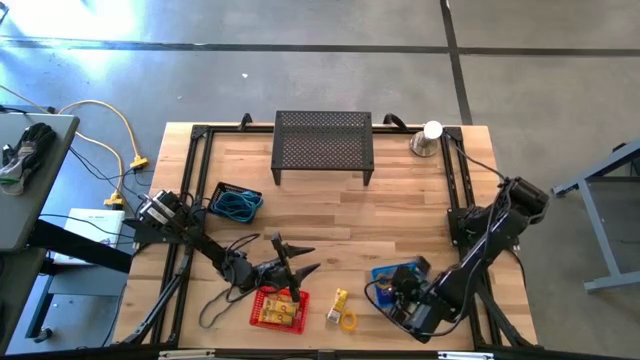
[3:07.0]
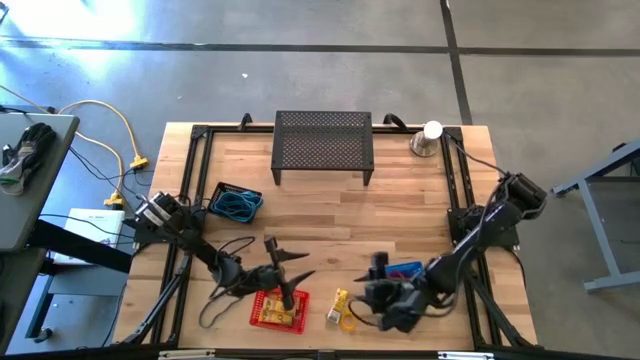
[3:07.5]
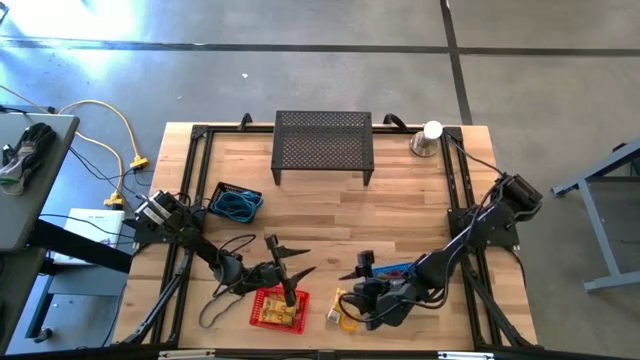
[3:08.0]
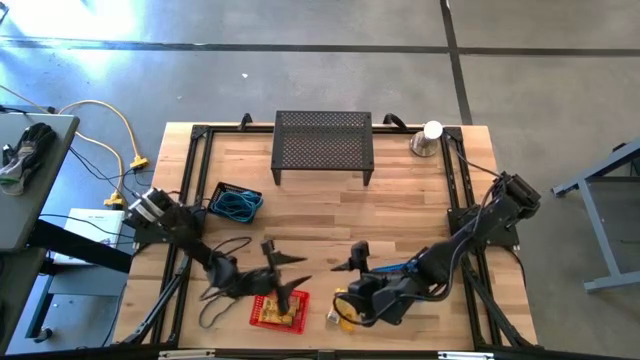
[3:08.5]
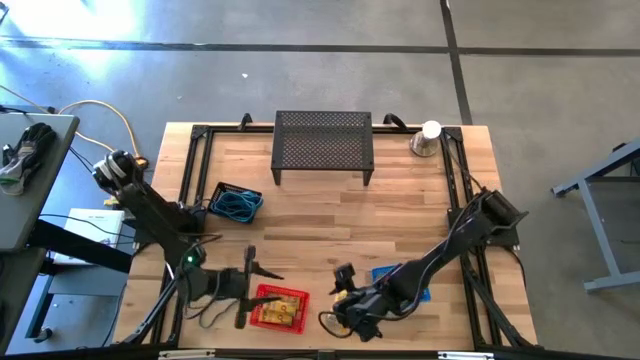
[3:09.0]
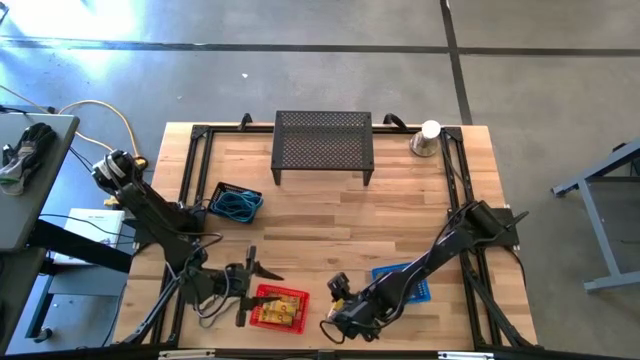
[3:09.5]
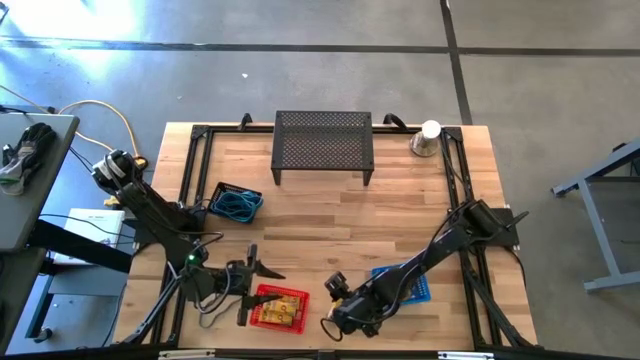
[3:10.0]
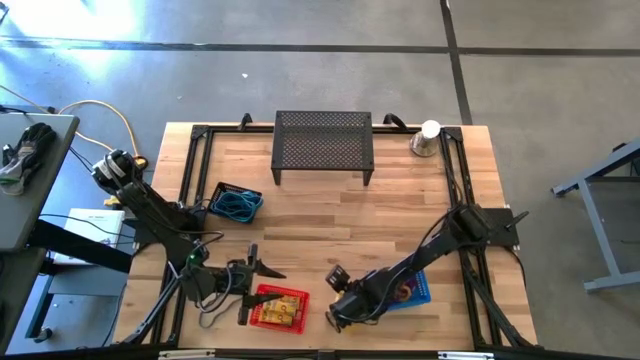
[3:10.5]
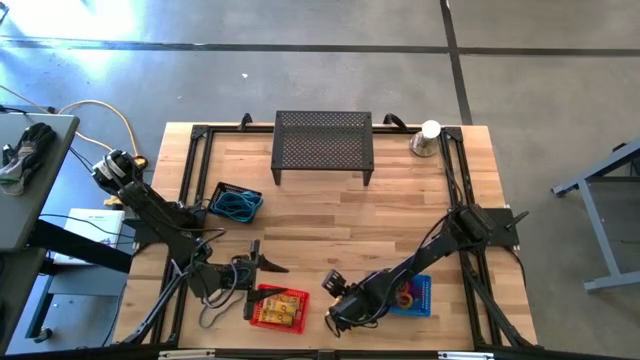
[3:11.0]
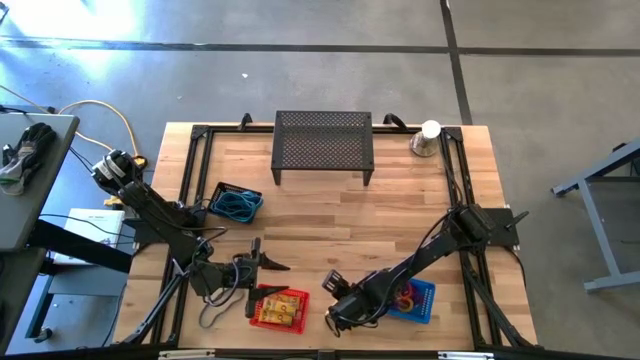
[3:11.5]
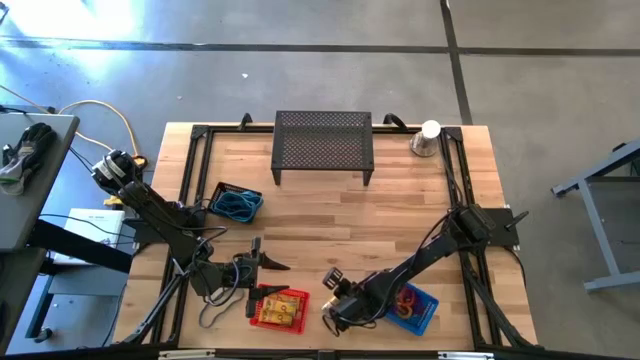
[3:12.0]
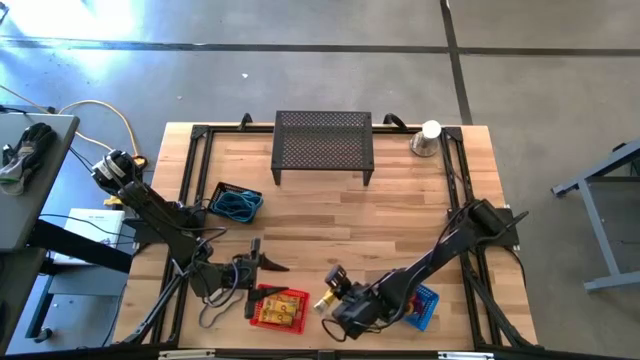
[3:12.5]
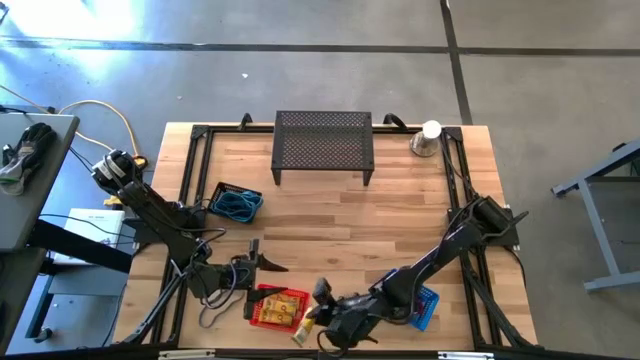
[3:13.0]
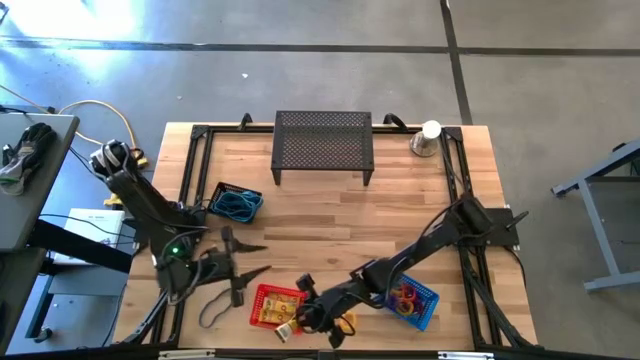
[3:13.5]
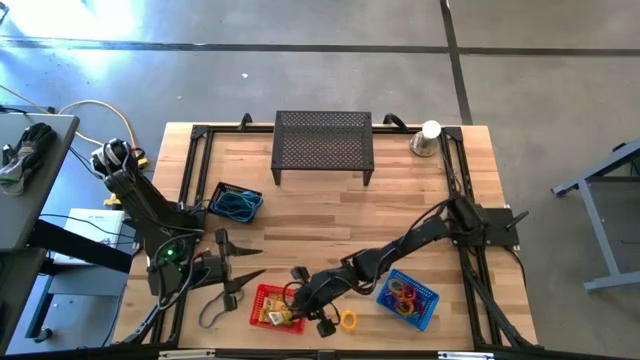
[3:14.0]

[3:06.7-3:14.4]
Task: Pick & Place Office Desk Supplies
Put the yellow crayon box into the red bin

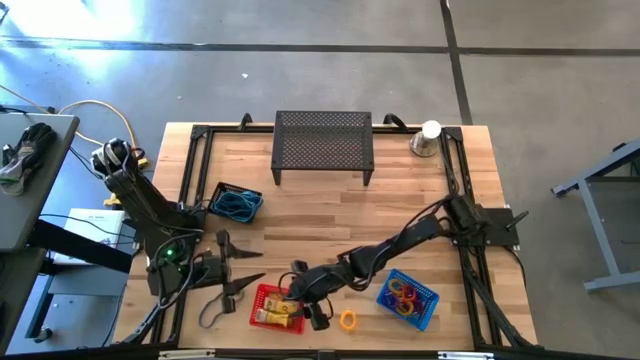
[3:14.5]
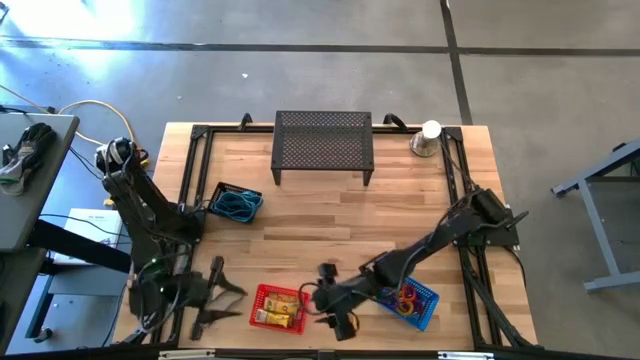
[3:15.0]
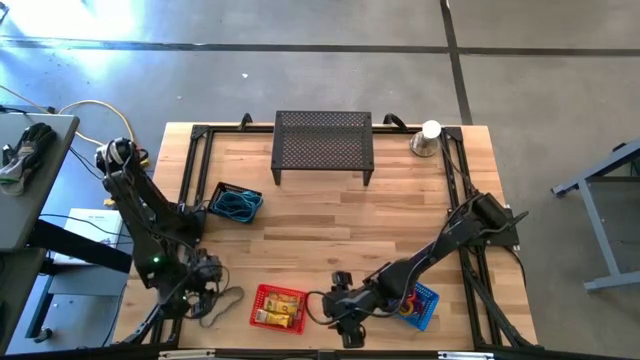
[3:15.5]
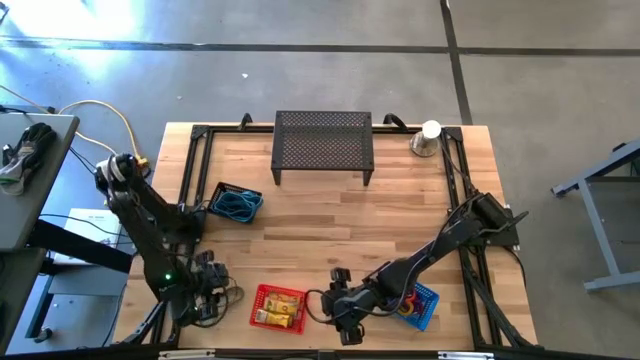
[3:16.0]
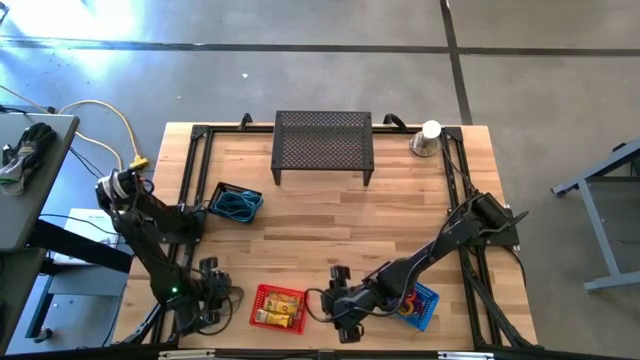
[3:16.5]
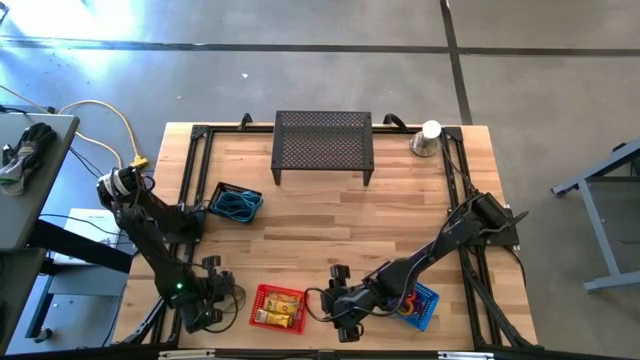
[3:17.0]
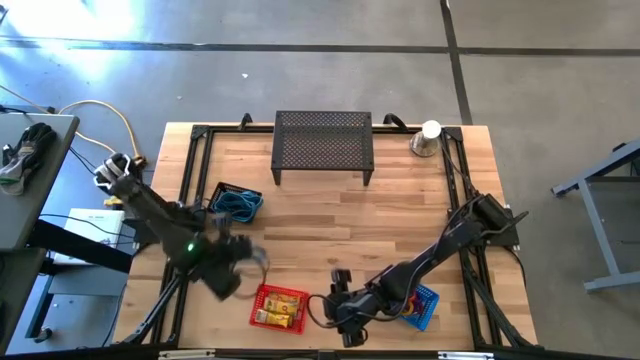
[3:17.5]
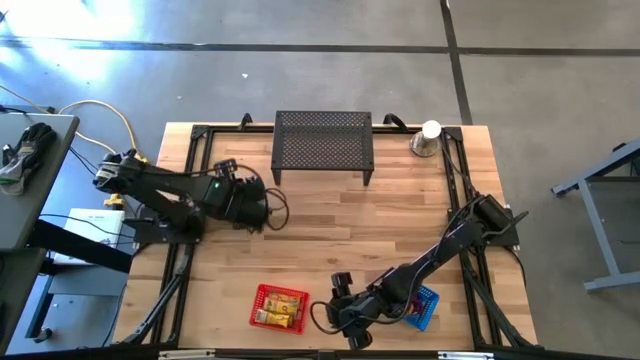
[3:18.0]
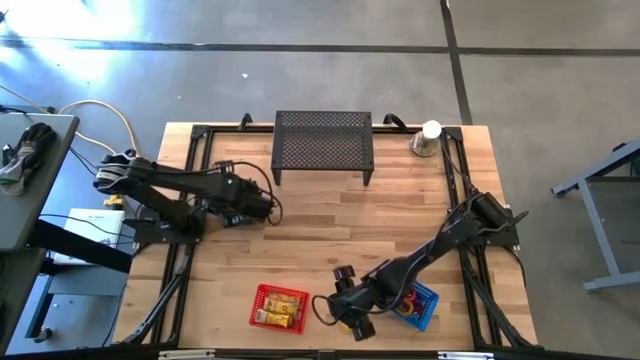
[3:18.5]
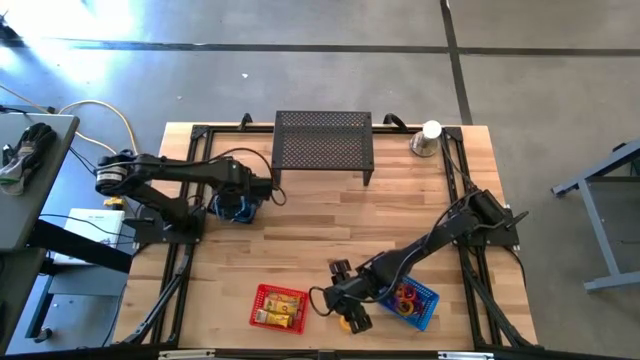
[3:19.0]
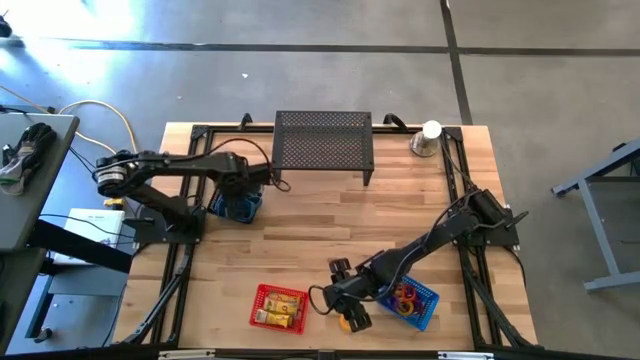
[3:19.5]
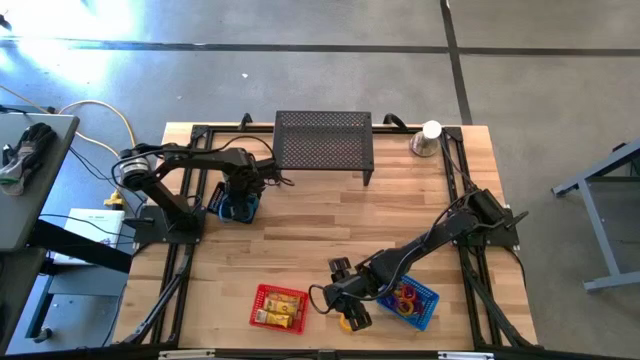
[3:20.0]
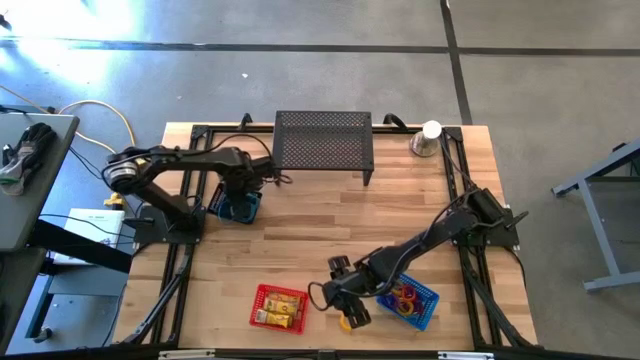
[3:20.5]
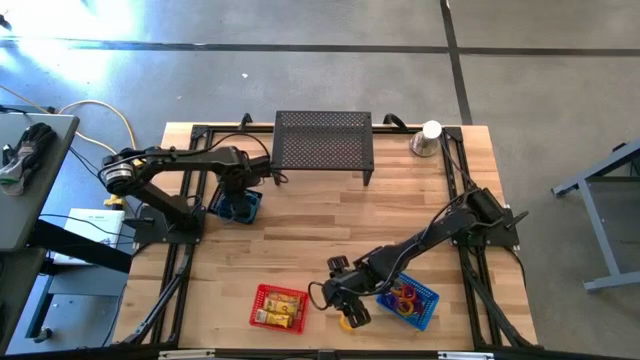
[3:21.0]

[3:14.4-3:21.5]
Put the blue rubber band into the black bin

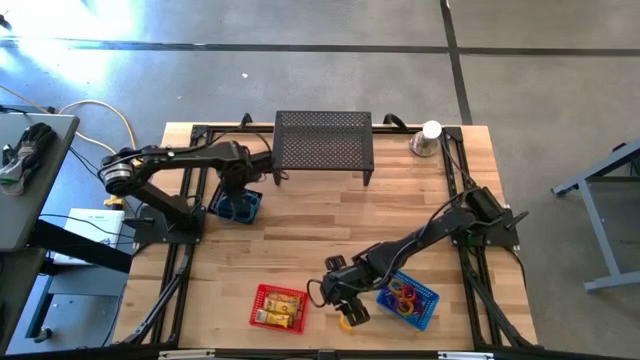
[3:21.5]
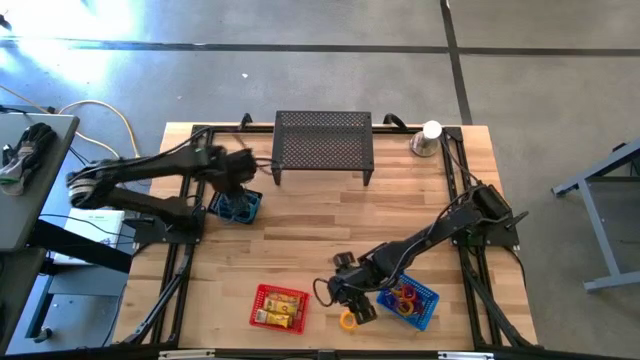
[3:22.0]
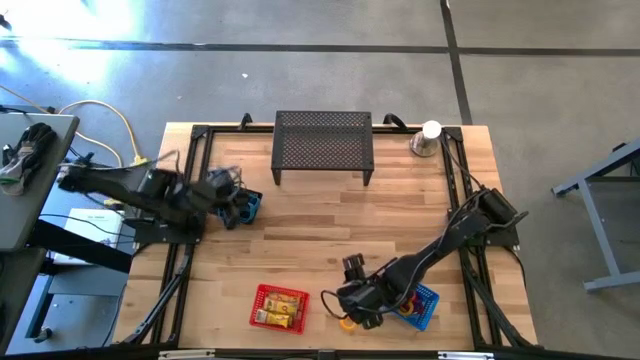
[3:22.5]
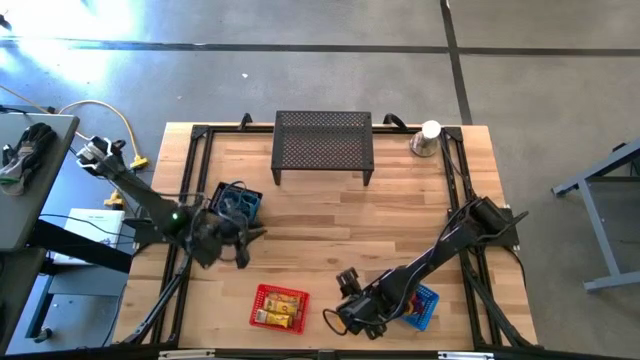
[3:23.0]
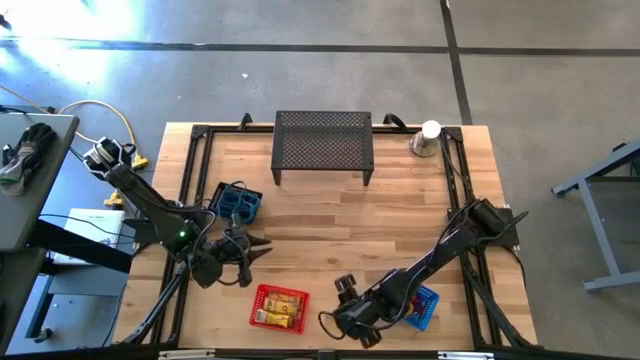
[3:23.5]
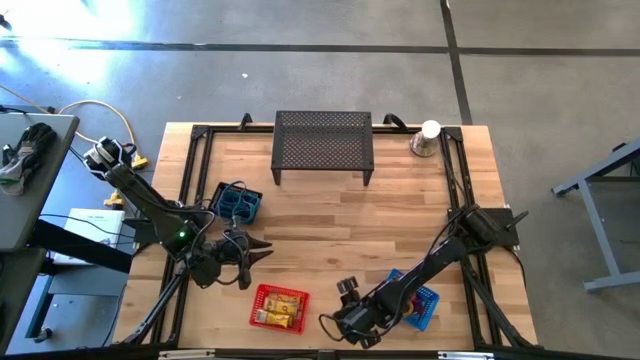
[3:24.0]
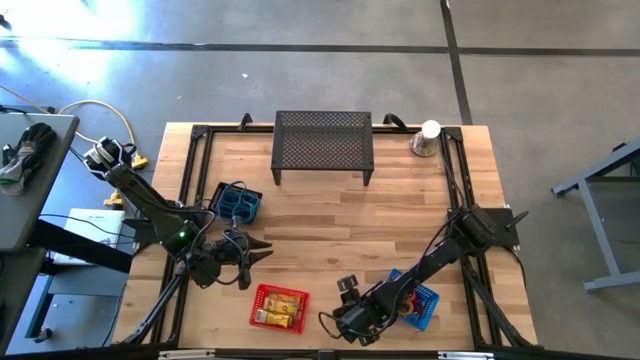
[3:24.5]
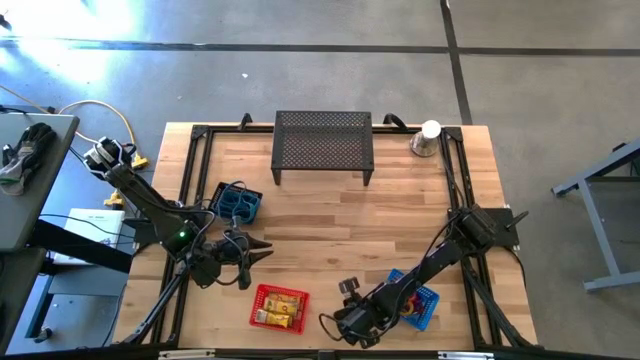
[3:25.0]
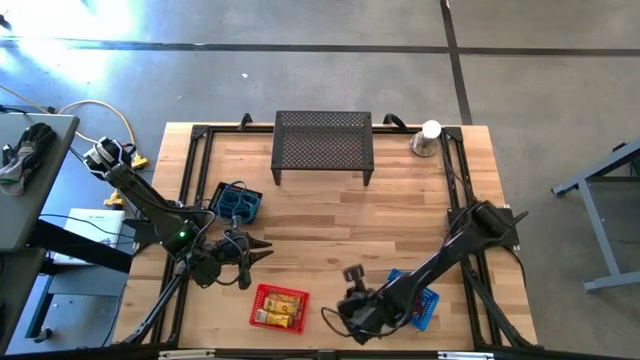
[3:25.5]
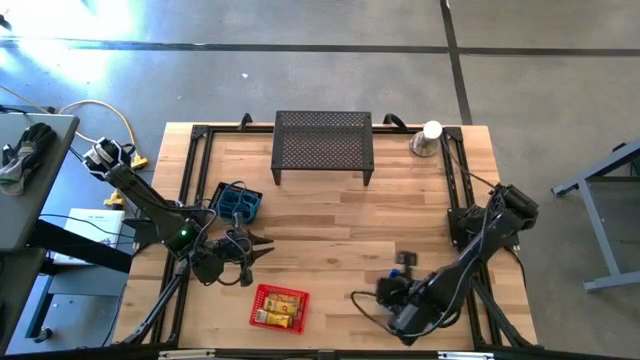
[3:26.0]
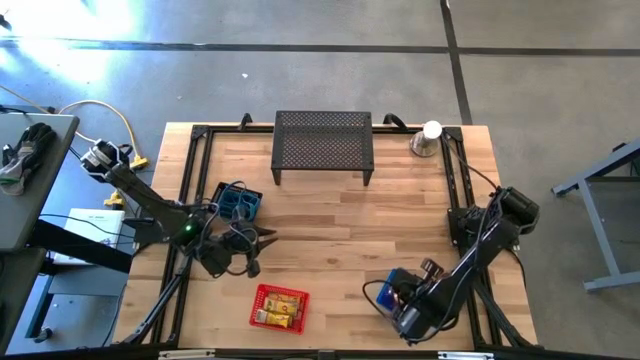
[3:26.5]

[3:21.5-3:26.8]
Put the yellow spring keychain into the blue bin
